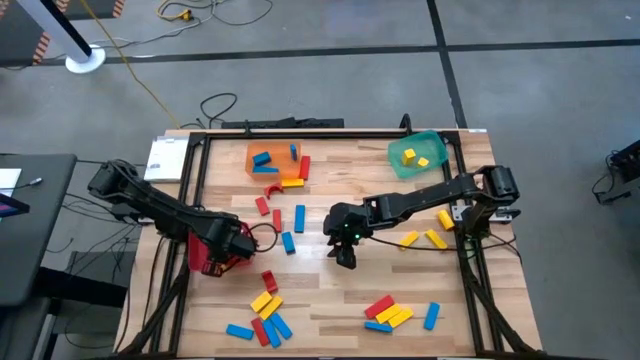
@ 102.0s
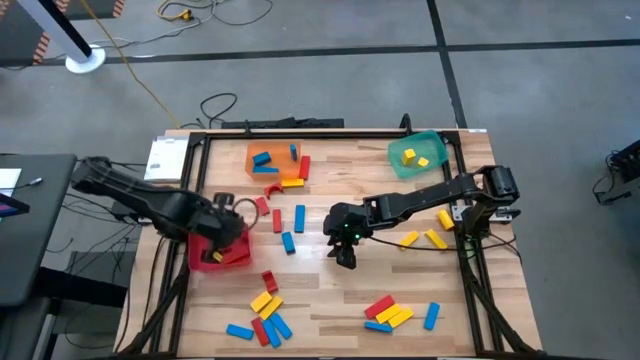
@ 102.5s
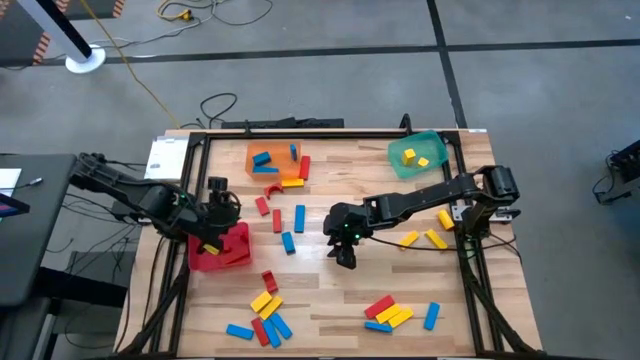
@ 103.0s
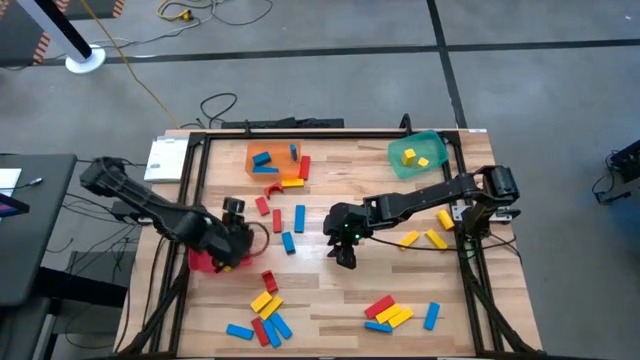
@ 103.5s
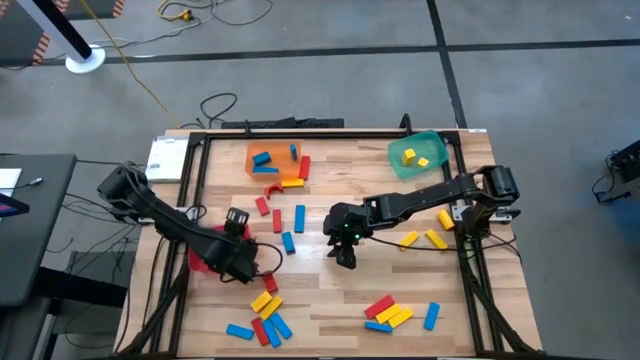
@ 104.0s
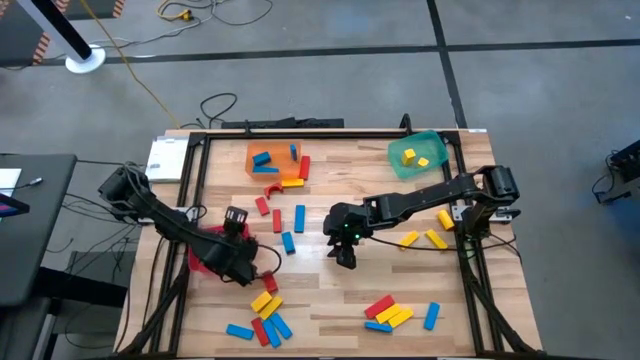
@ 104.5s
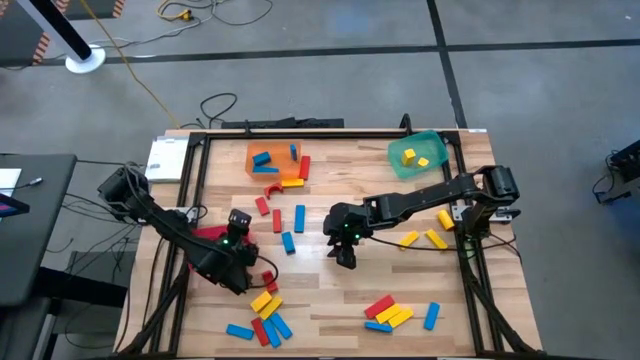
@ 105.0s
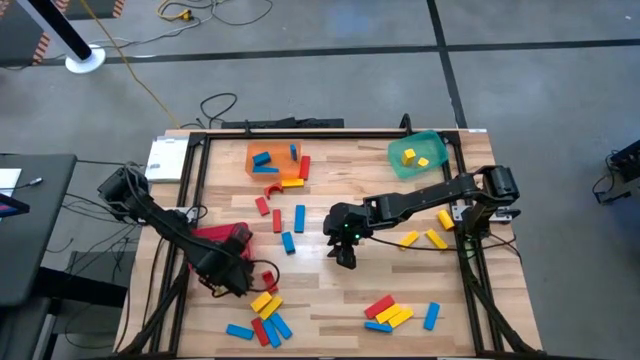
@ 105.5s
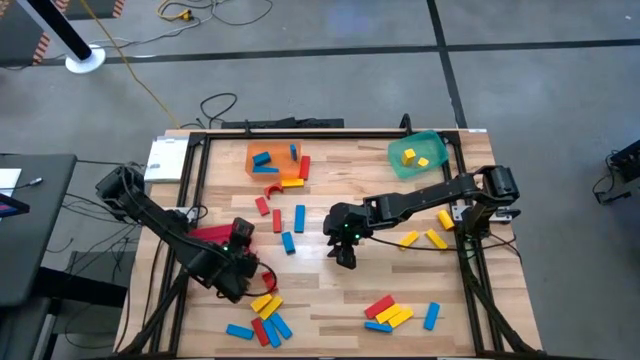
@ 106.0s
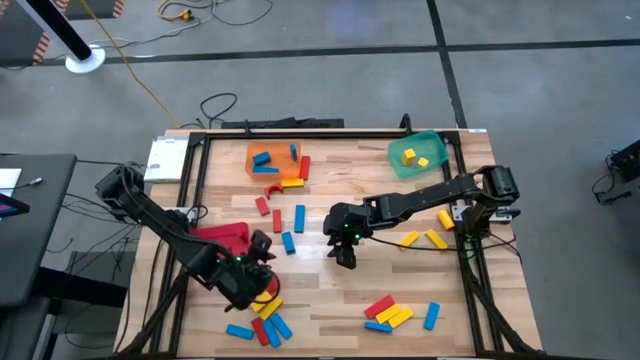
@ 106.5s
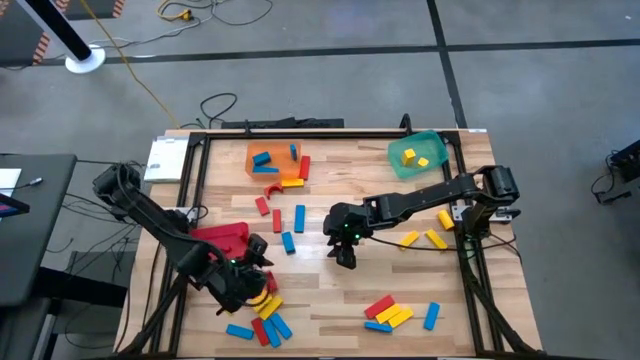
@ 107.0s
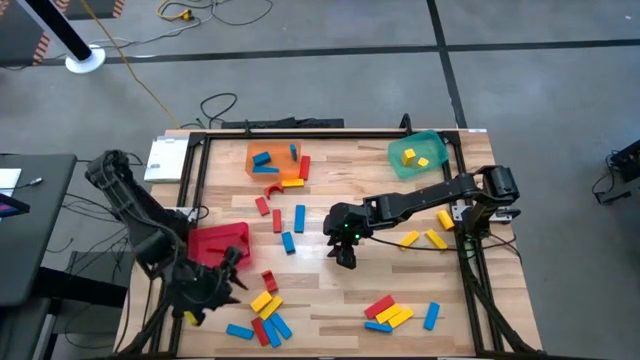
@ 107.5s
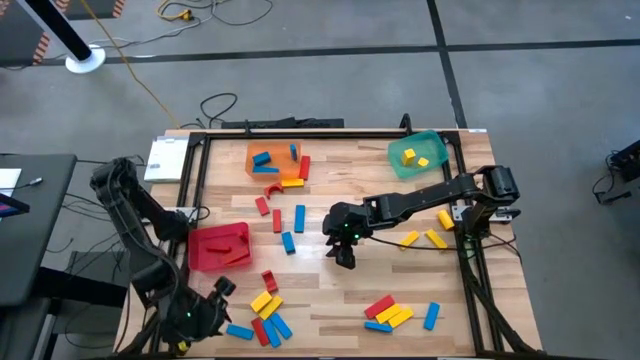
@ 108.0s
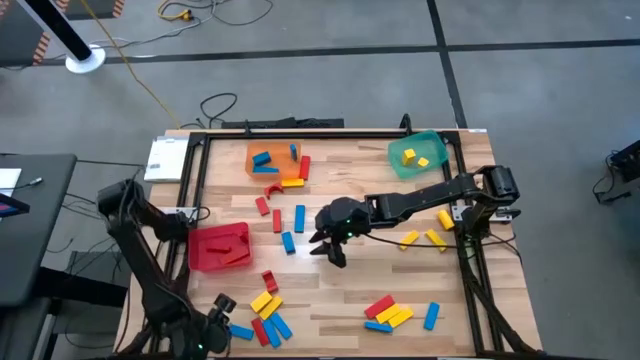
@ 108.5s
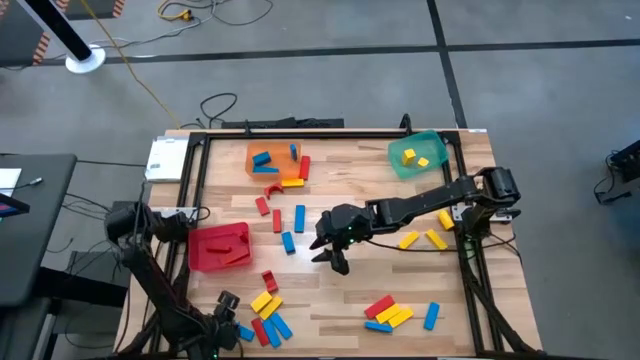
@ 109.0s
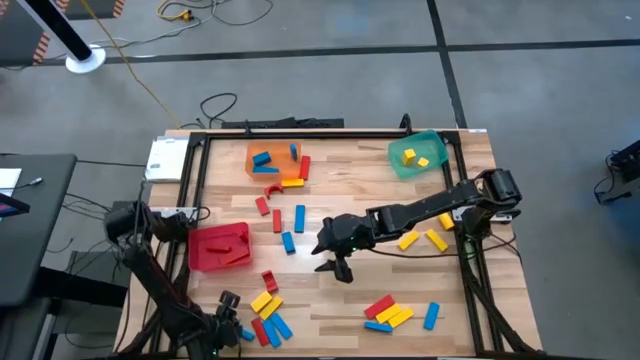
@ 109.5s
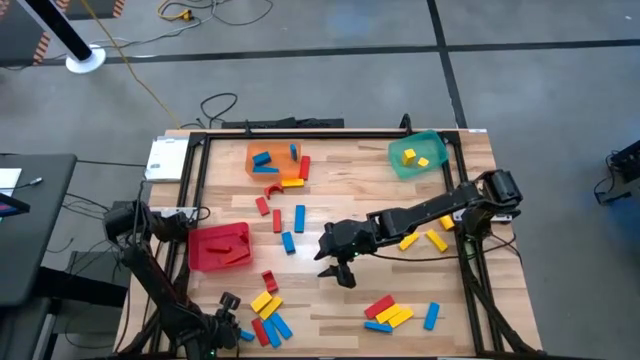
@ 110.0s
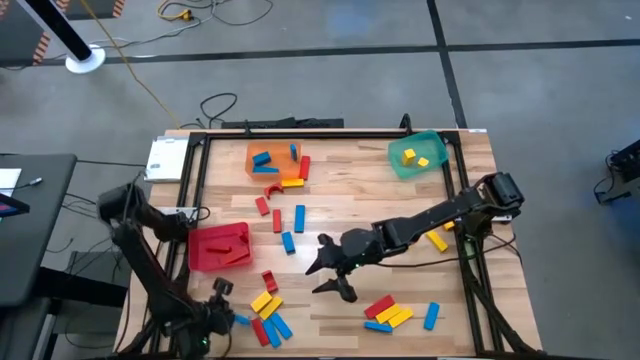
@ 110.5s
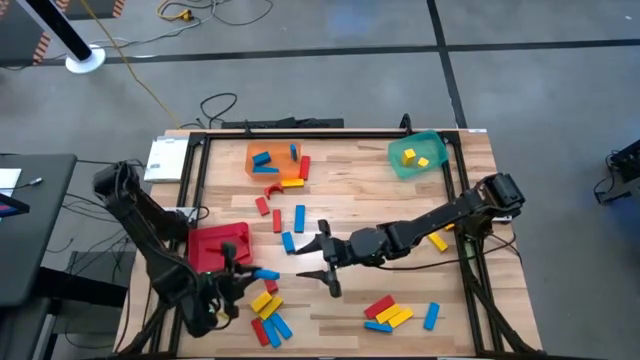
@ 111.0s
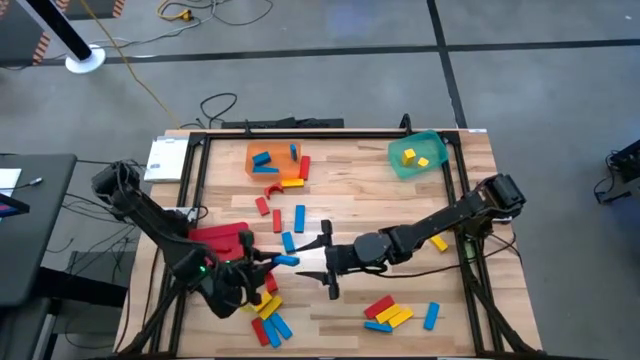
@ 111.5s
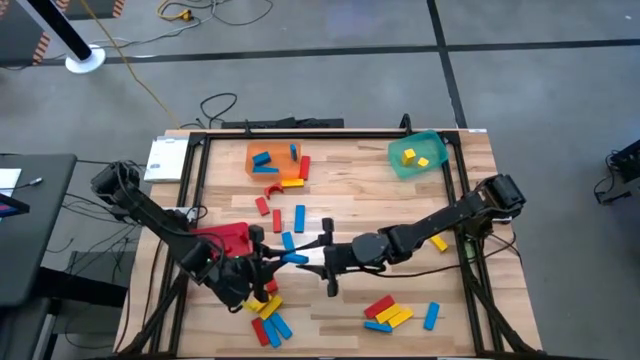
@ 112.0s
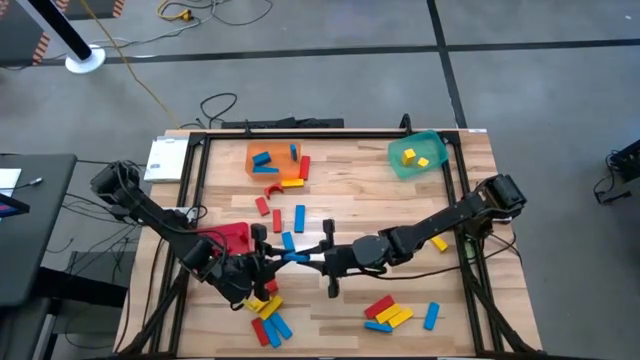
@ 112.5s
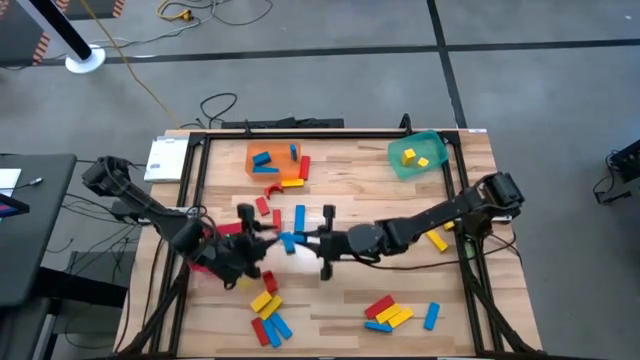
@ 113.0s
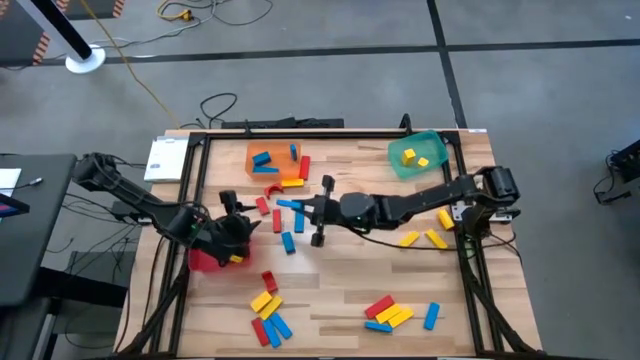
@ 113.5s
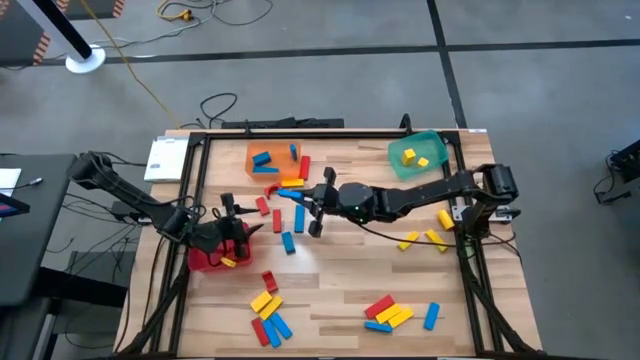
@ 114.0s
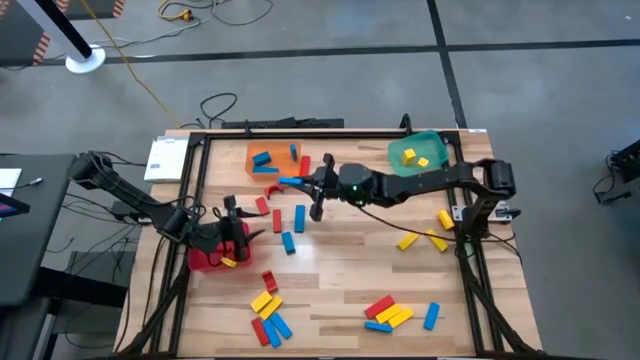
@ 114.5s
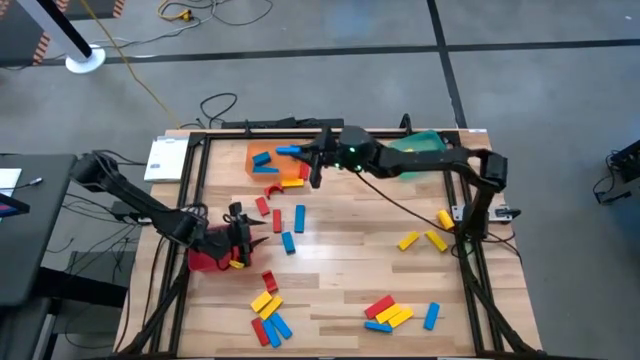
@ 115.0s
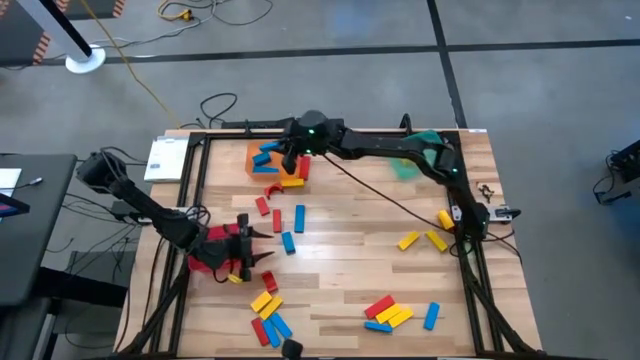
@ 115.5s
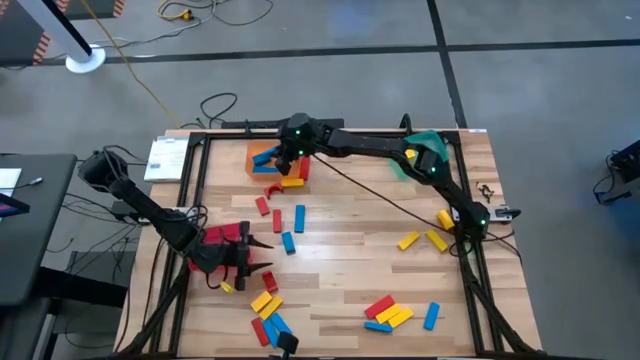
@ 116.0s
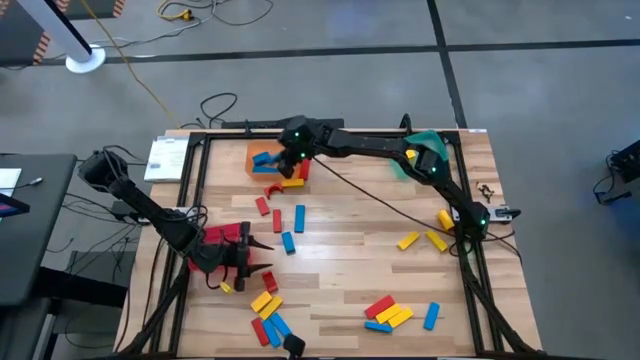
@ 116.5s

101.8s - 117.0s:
Task: Sort blocks
Put the blue block into the orange bin

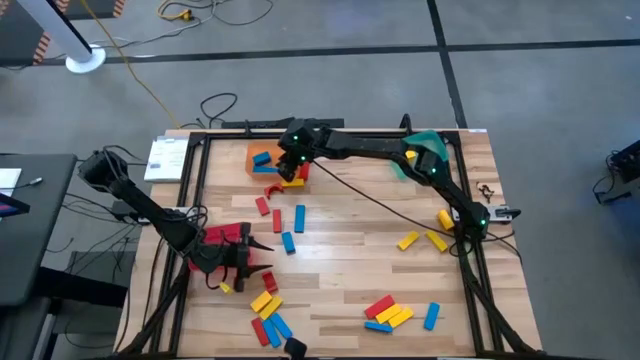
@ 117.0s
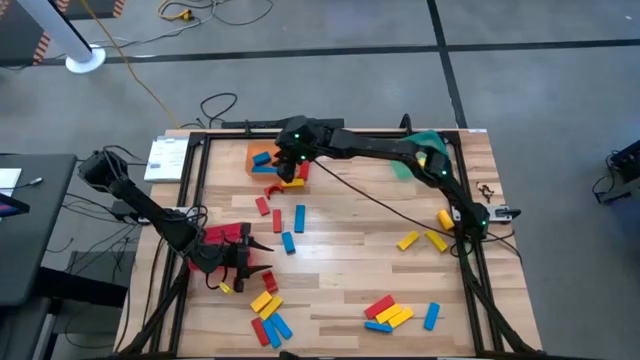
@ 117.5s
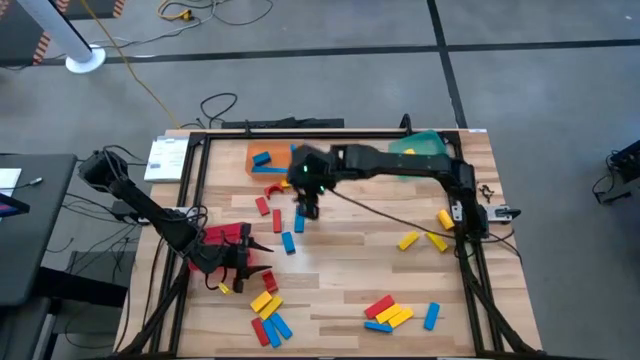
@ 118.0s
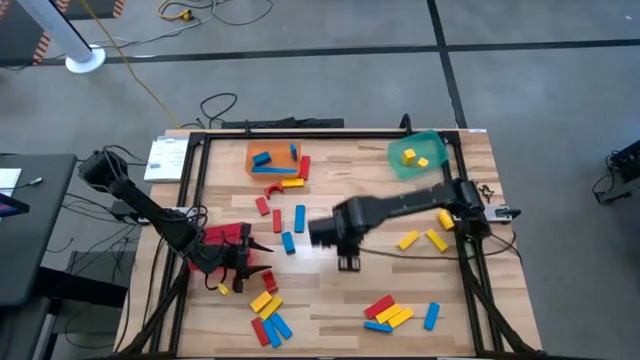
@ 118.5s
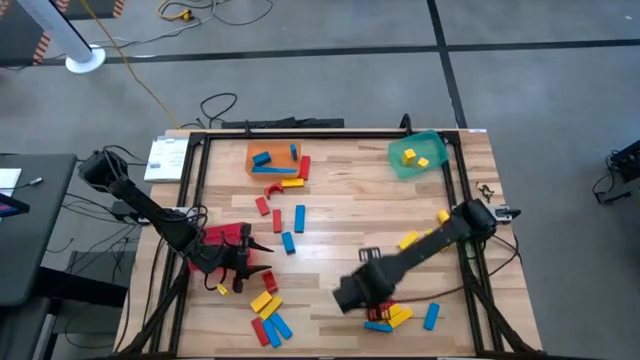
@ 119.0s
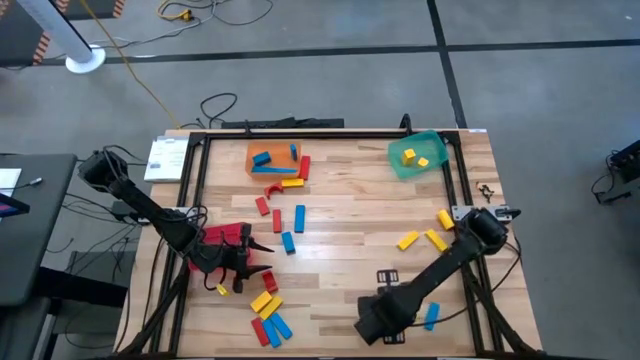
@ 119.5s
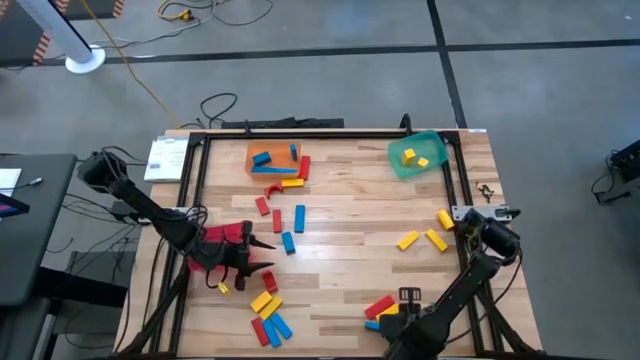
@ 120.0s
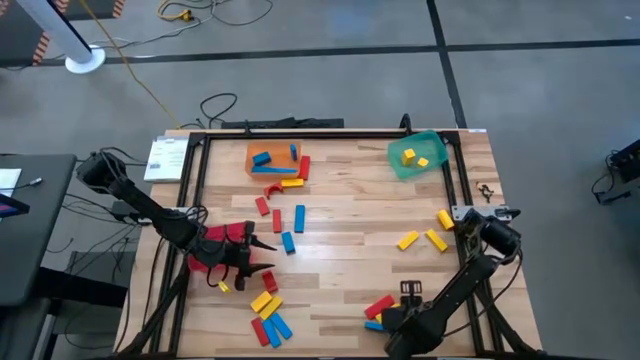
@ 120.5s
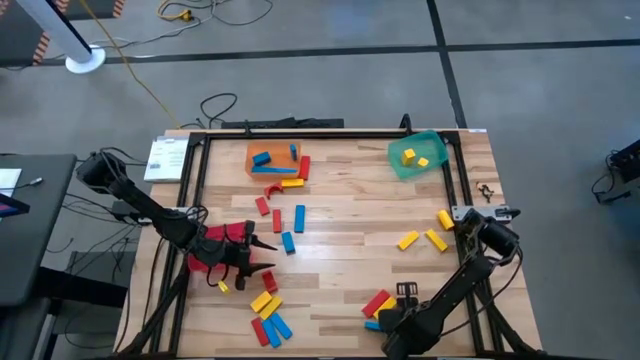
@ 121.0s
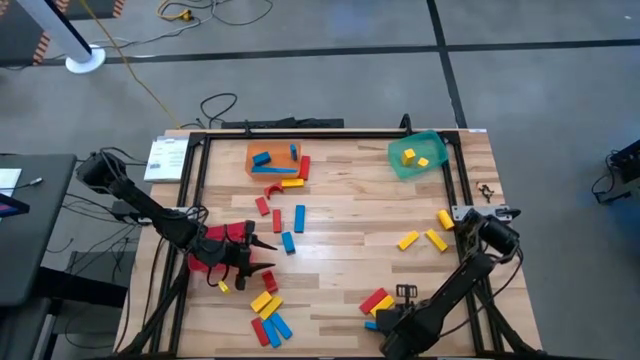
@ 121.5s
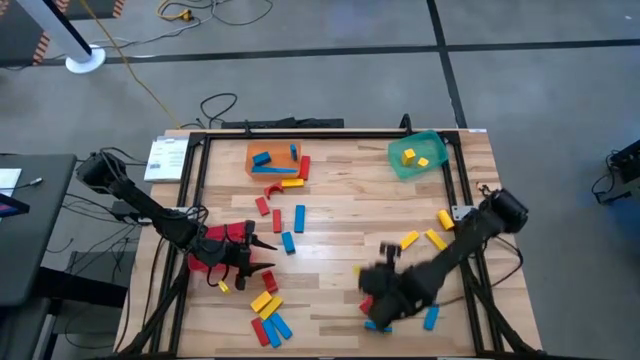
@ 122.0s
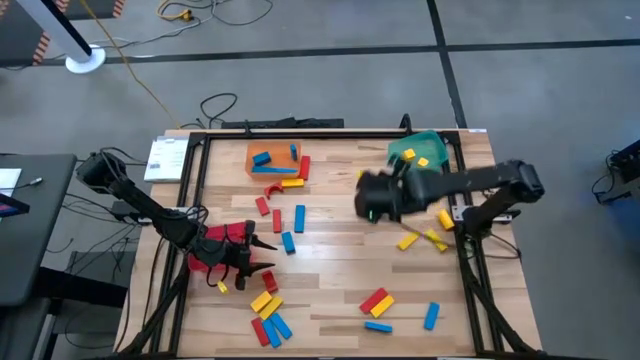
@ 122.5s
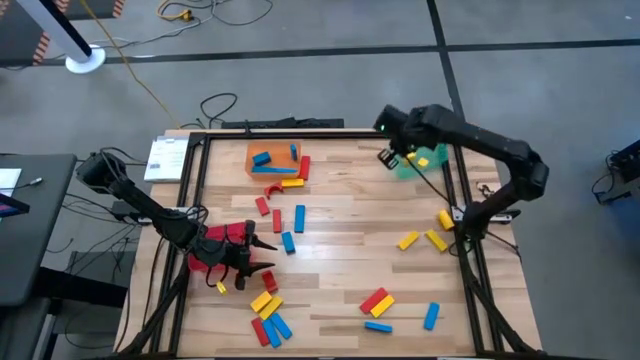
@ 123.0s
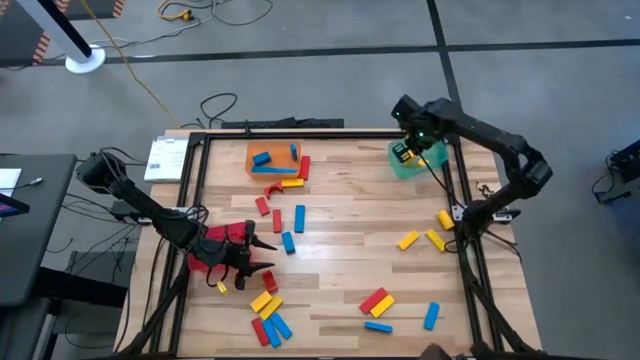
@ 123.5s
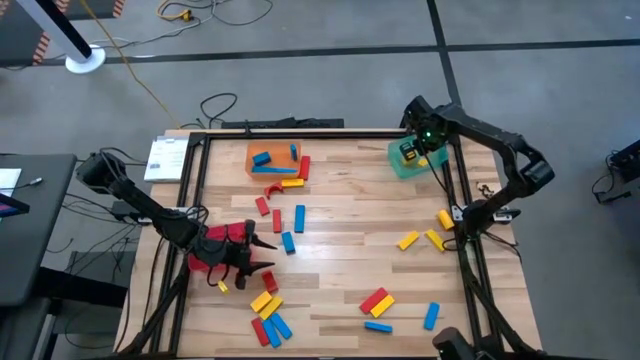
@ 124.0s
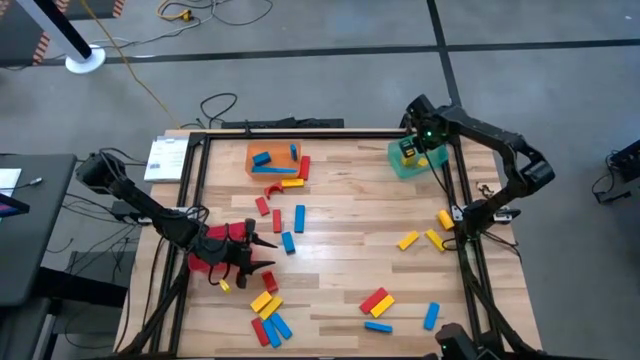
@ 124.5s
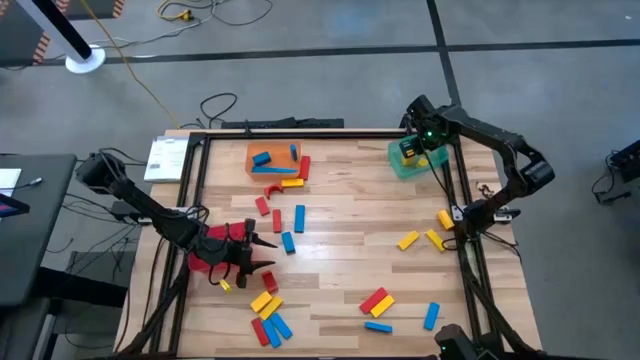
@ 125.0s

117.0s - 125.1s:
Put the yellow block into the green bin
